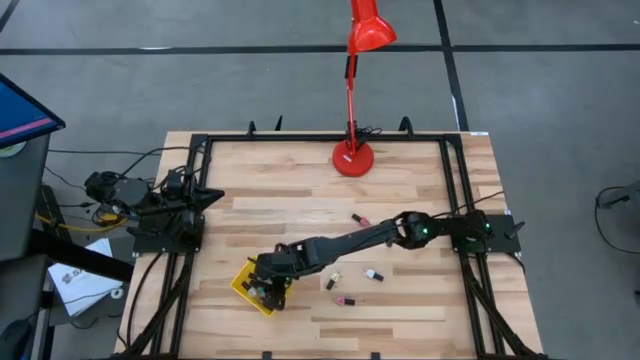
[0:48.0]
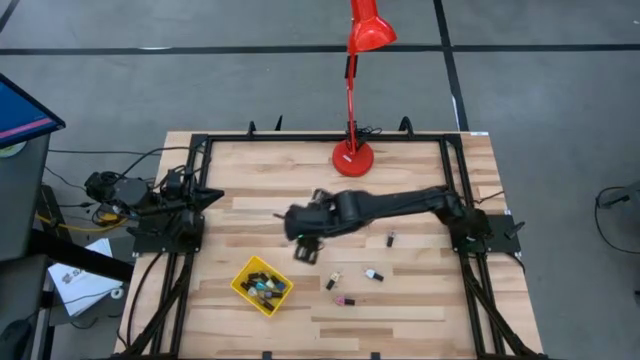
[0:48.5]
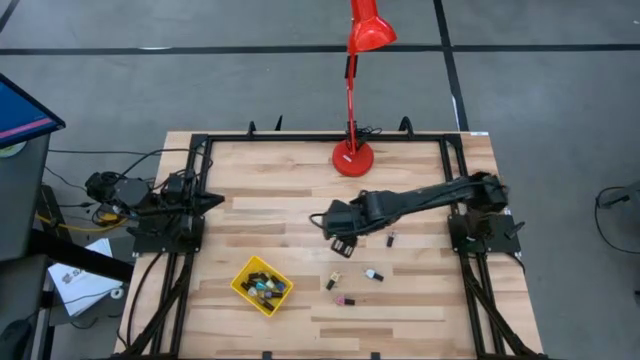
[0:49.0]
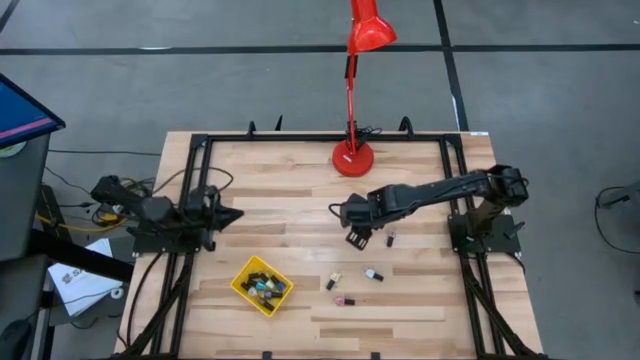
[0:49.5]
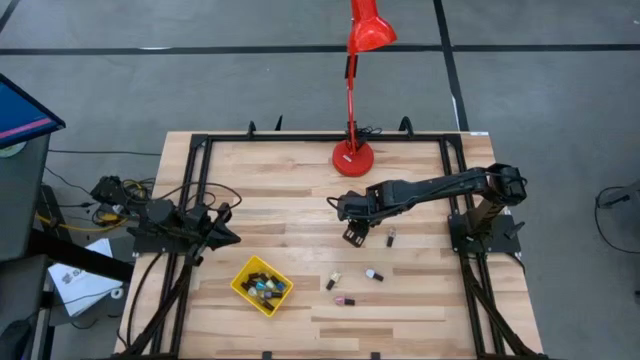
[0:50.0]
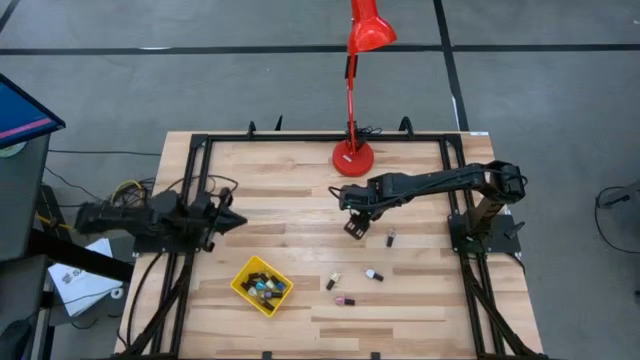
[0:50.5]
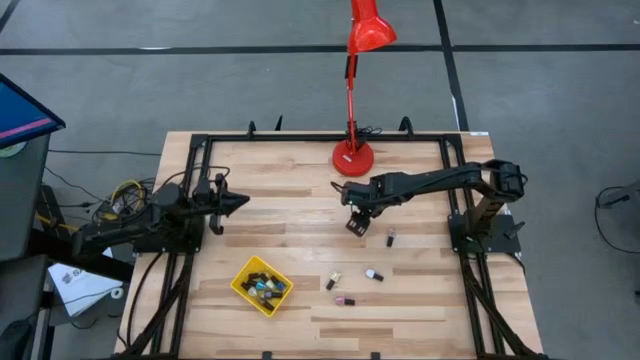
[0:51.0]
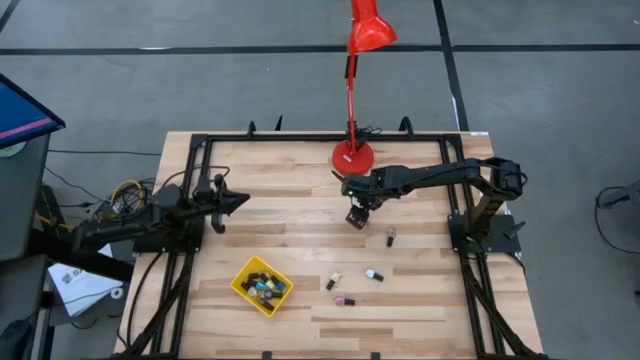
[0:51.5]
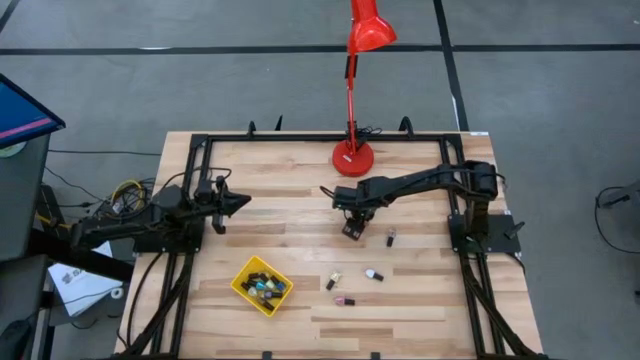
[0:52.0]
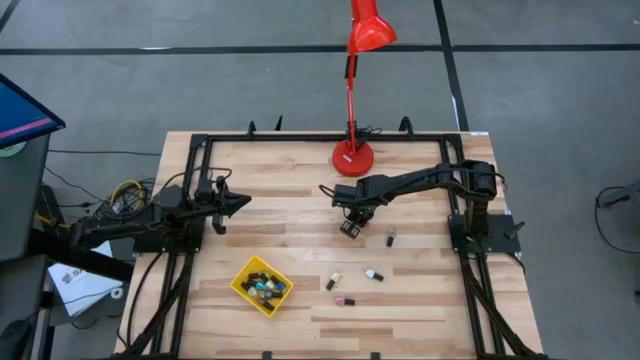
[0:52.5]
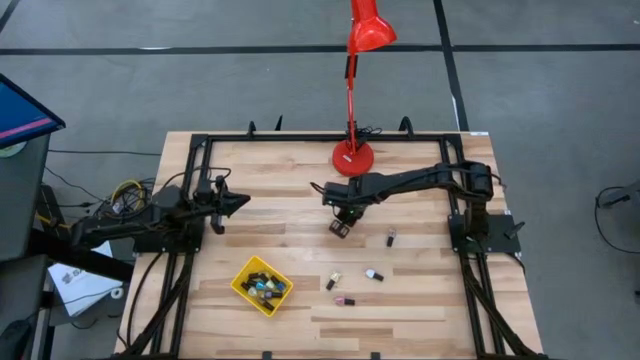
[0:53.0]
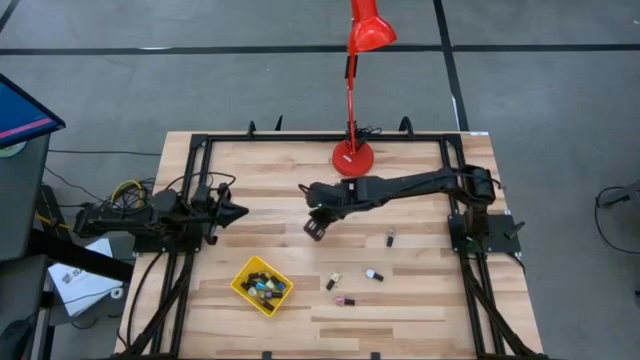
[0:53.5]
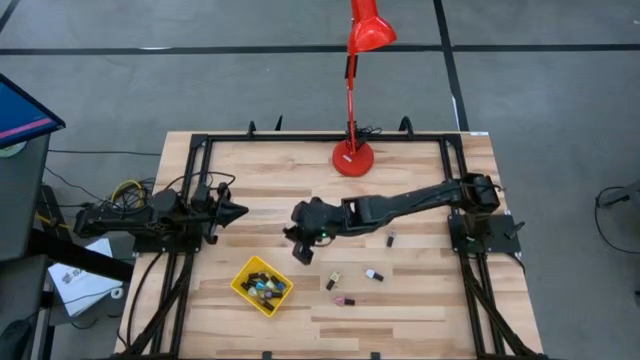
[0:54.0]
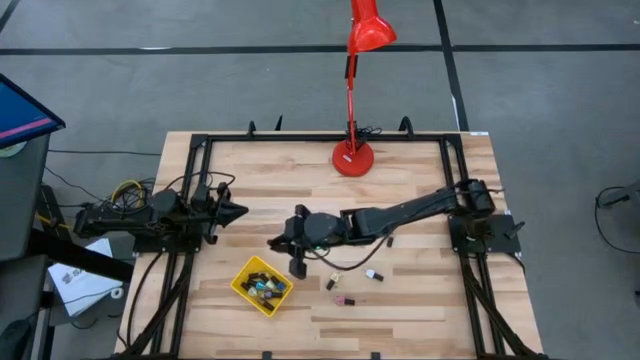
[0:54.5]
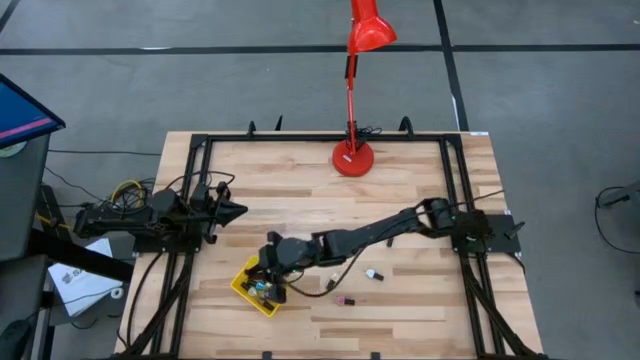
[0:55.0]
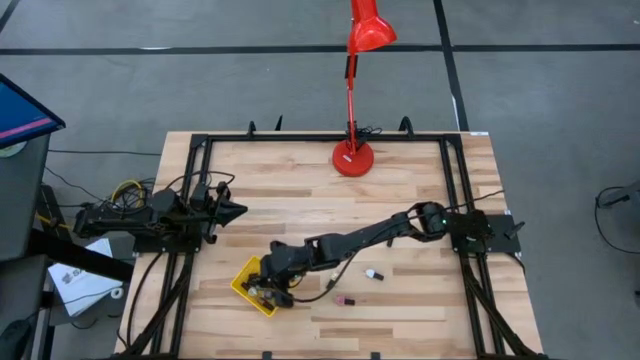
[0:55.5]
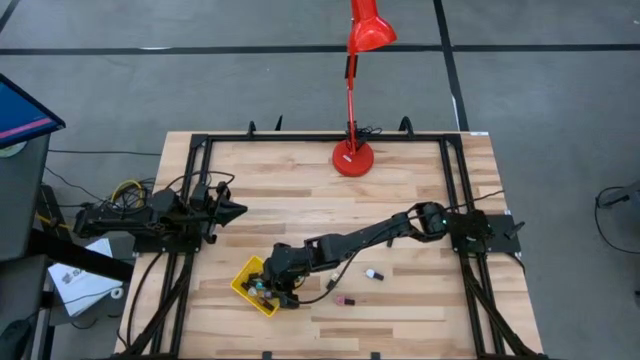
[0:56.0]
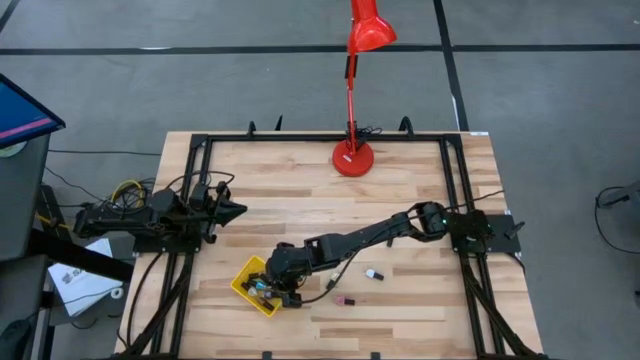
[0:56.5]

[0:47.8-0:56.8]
Task: Pick & Place Nail Polish
Put the red nail polish bottle into the yellow basket

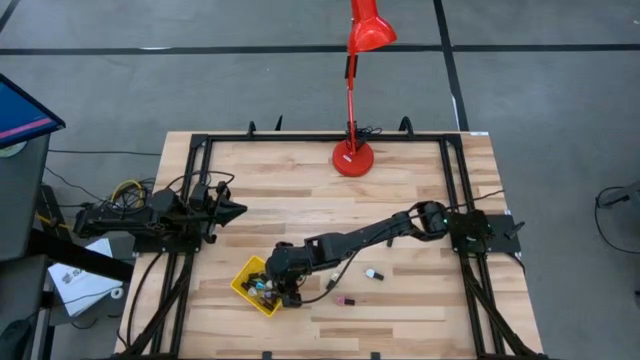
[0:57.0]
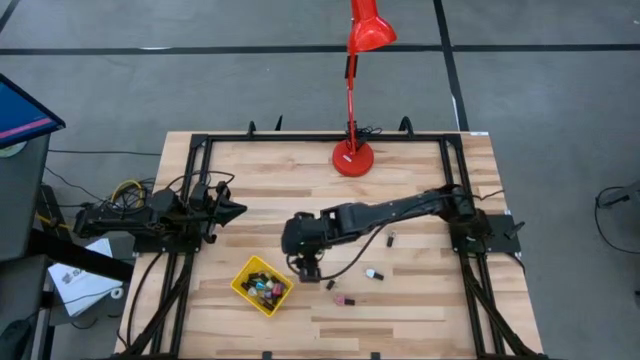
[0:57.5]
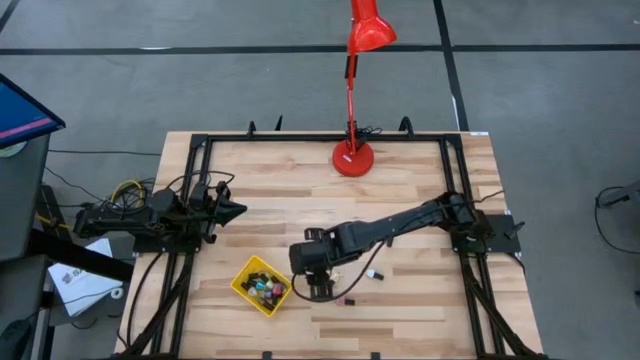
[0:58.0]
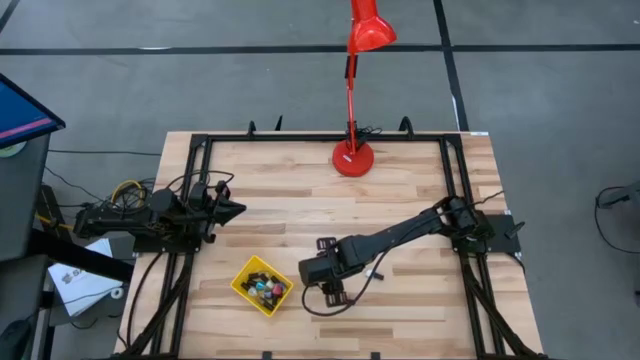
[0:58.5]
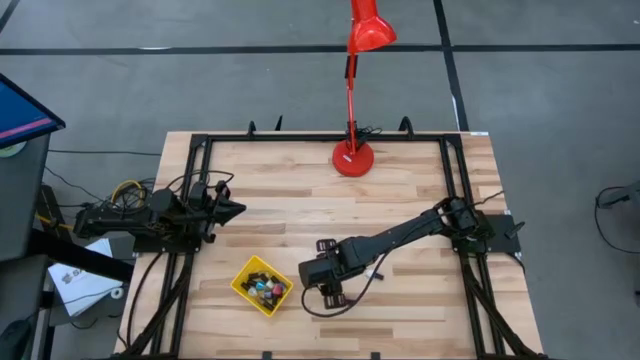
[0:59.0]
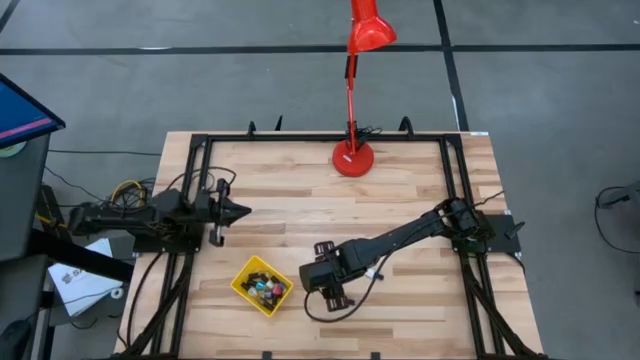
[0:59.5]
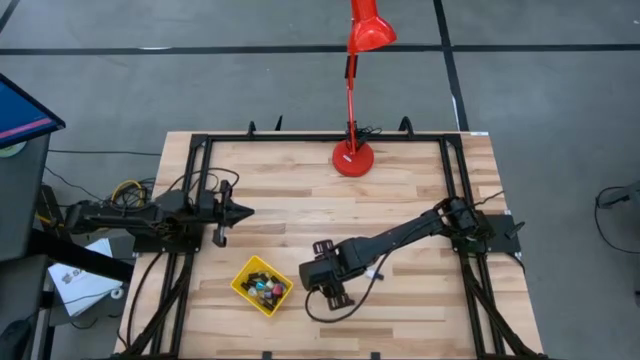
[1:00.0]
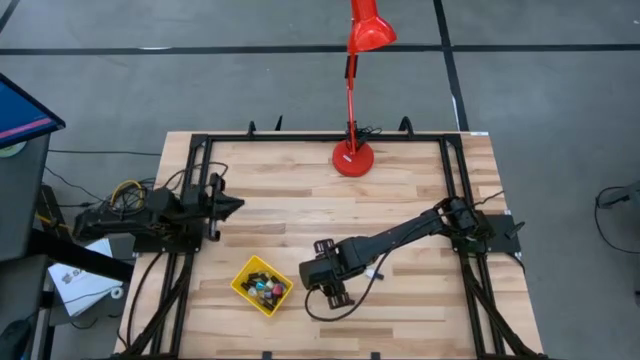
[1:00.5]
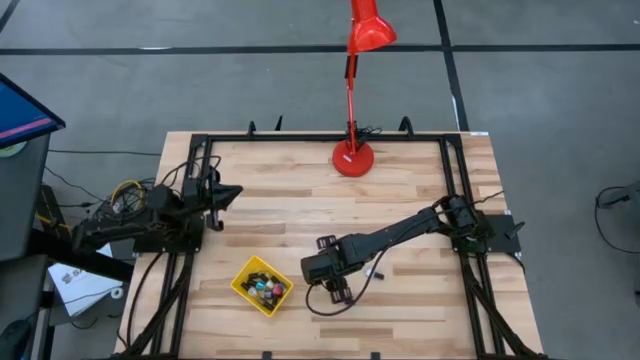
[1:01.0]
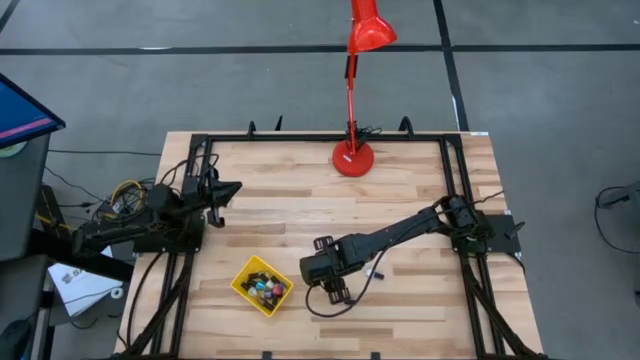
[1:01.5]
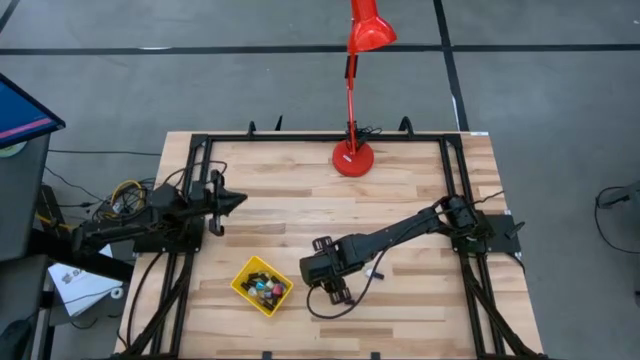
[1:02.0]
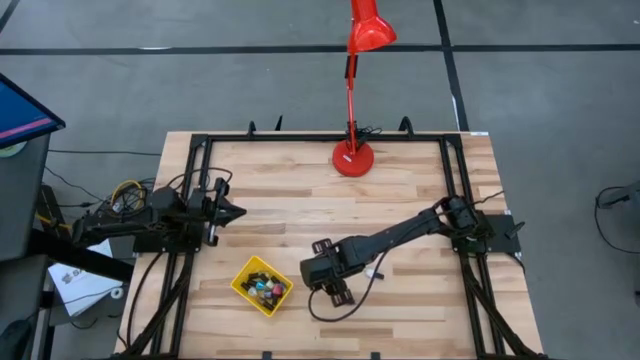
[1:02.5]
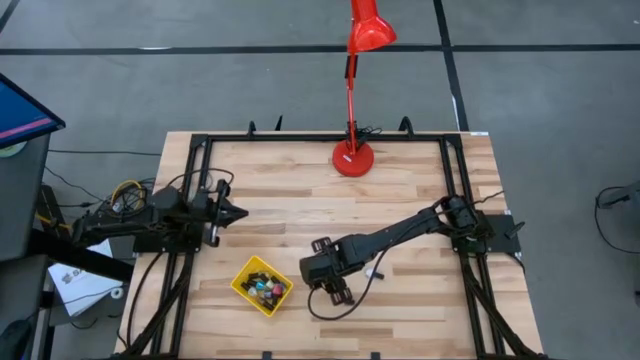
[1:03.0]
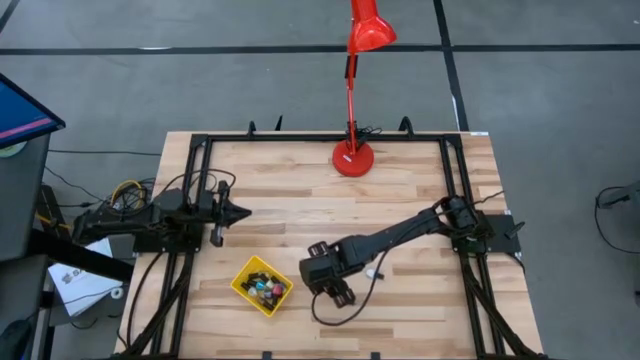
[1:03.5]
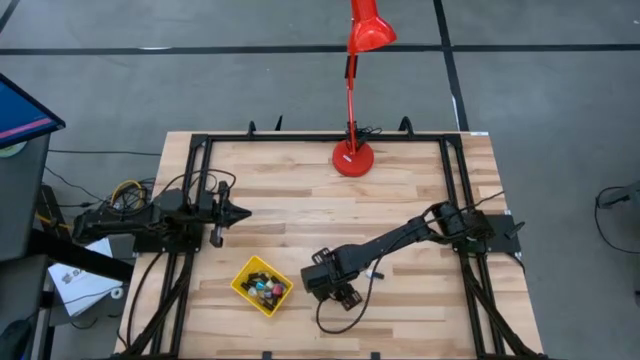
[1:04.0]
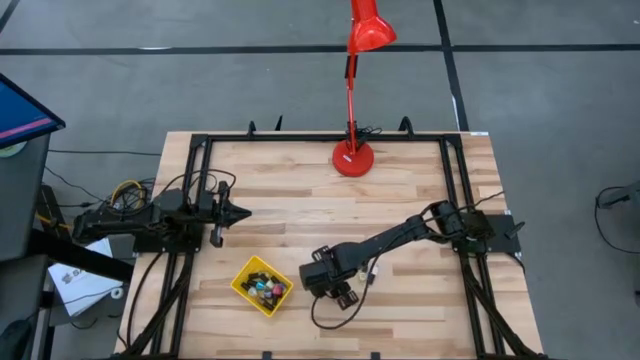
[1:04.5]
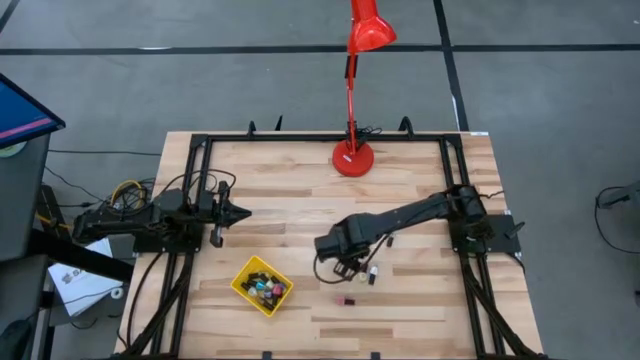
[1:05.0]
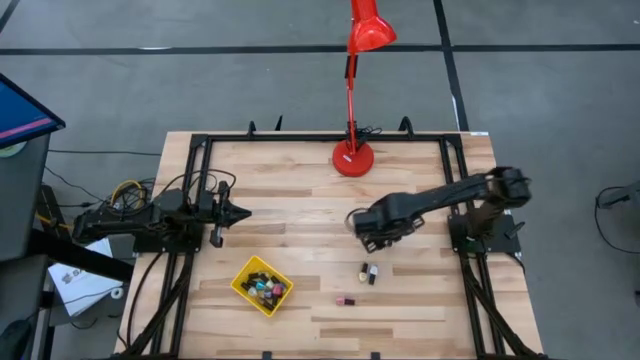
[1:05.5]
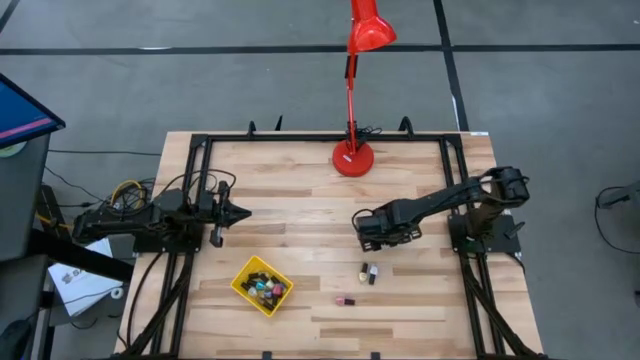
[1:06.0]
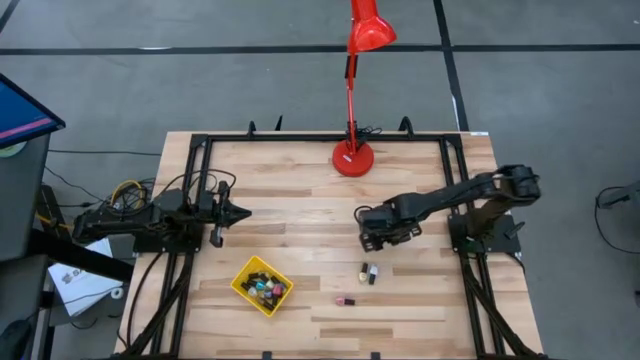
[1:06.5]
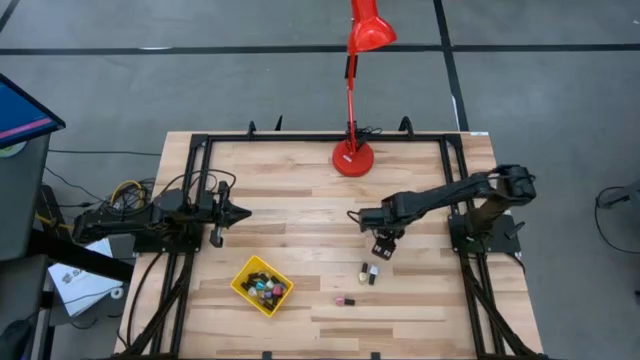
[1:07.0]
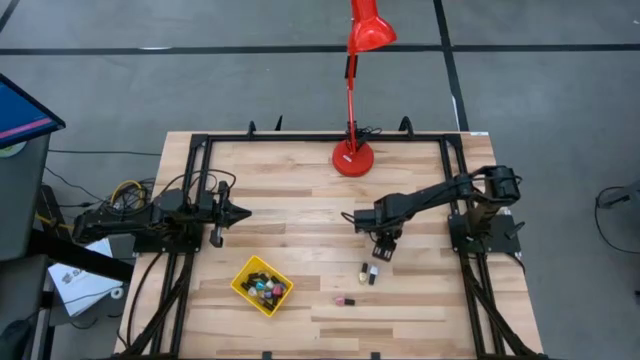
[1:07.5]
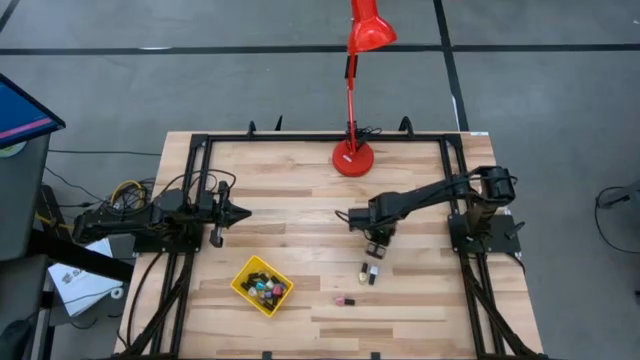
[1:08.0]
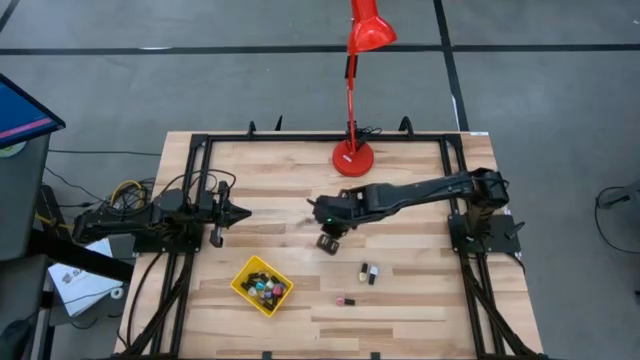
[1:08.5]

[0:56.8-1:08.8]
Put the transparent nail polish bottle into the yellow basket

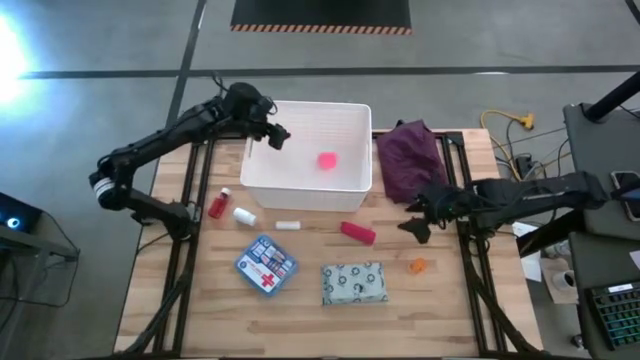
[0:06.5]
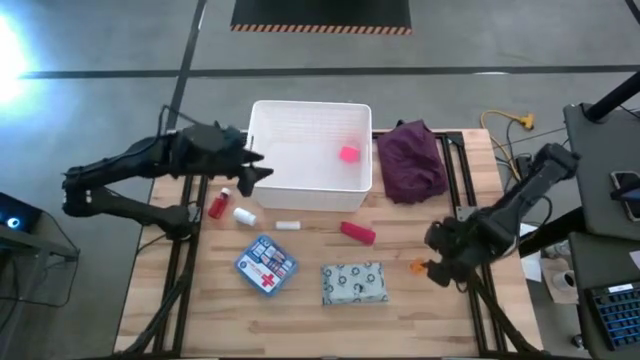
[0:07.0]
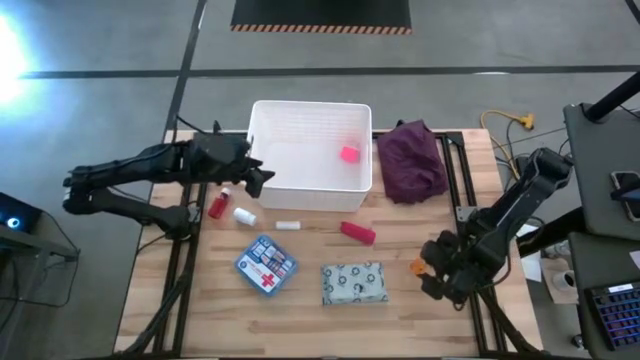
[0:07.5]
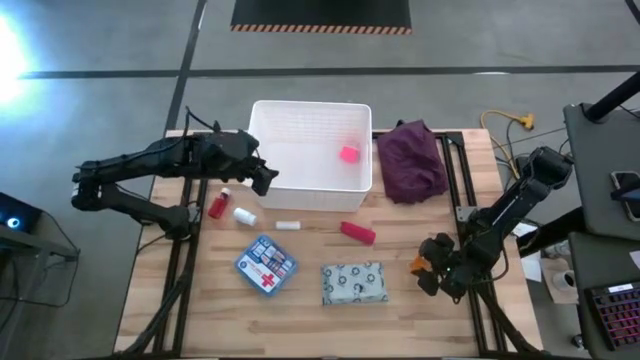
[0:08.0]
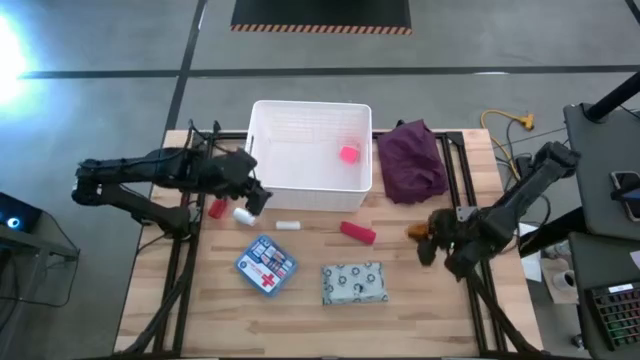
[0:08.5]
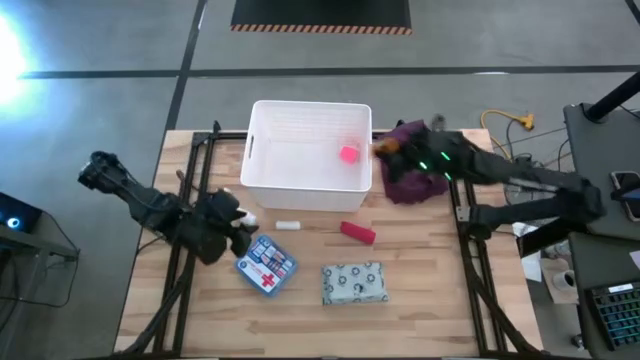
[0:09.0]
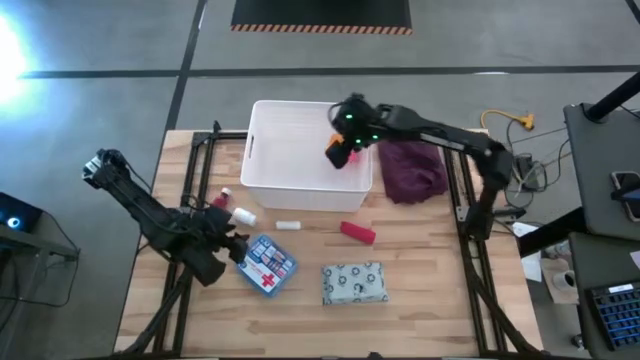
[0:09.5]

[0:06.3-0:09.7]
Task: Pick & place medical supplies in basket/bin
Put the orange pill bottle into the white bin
